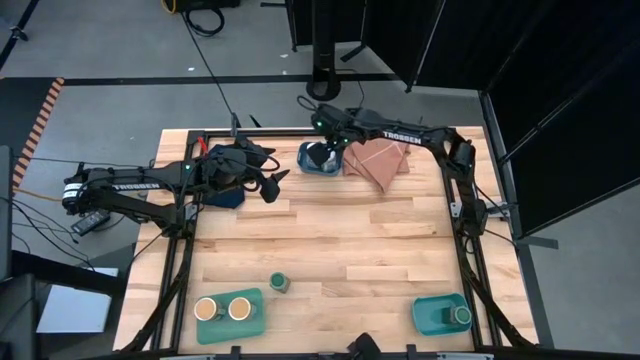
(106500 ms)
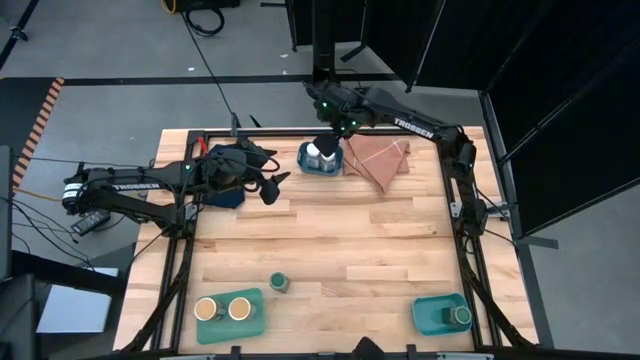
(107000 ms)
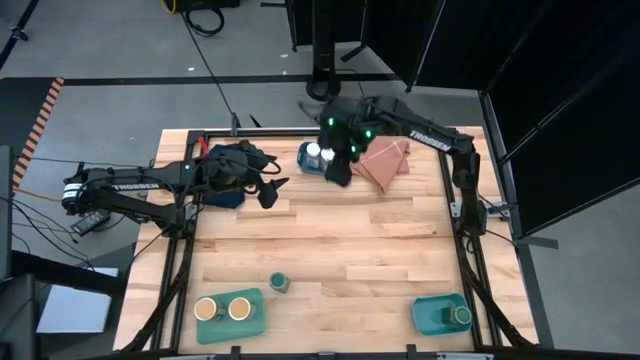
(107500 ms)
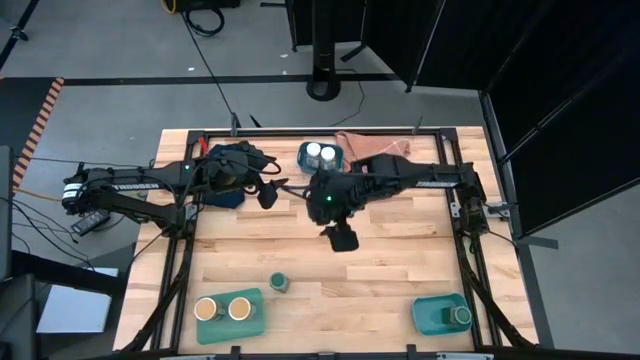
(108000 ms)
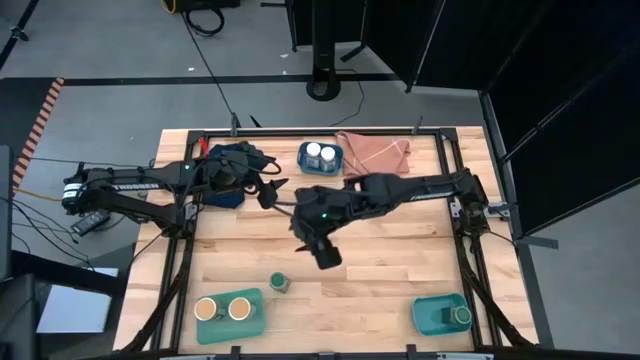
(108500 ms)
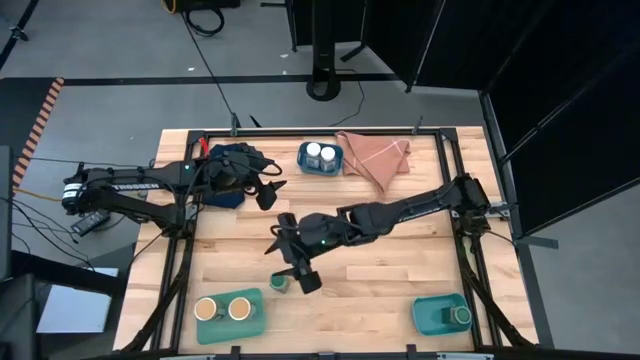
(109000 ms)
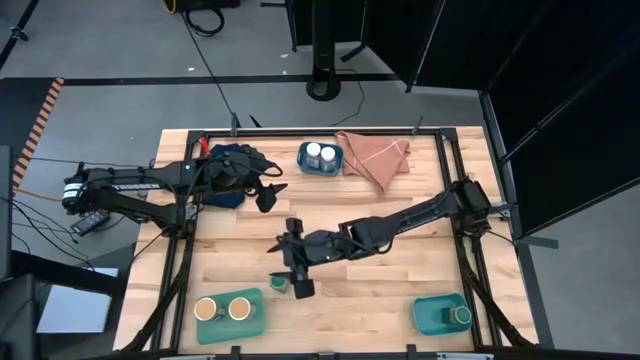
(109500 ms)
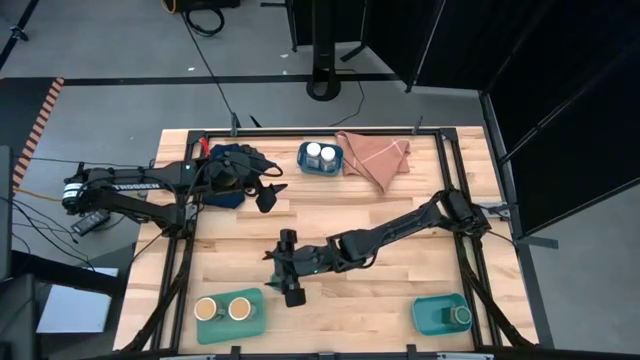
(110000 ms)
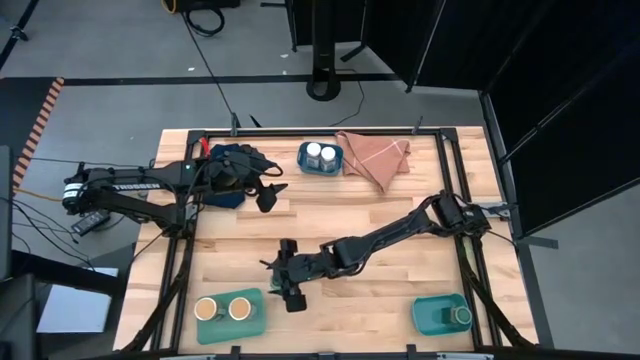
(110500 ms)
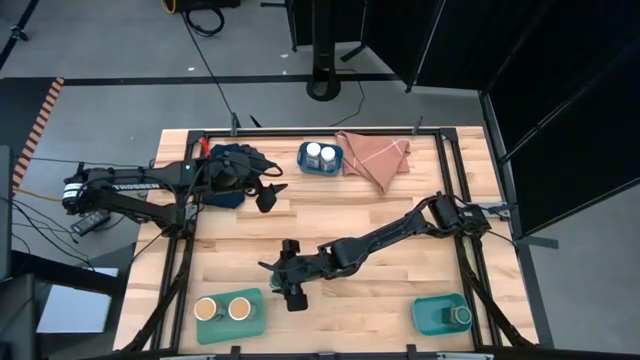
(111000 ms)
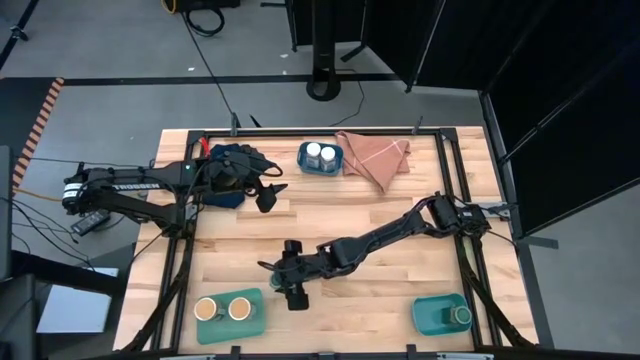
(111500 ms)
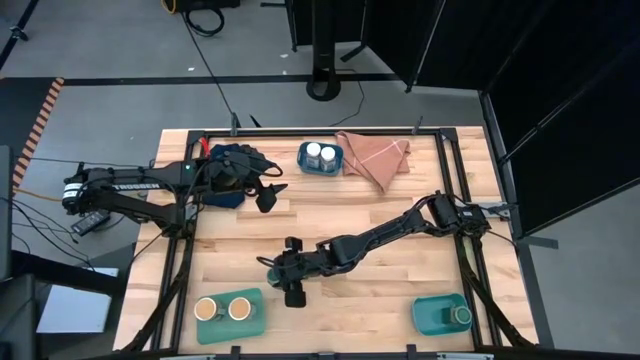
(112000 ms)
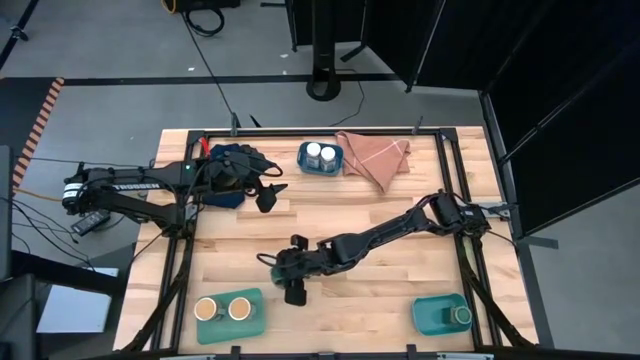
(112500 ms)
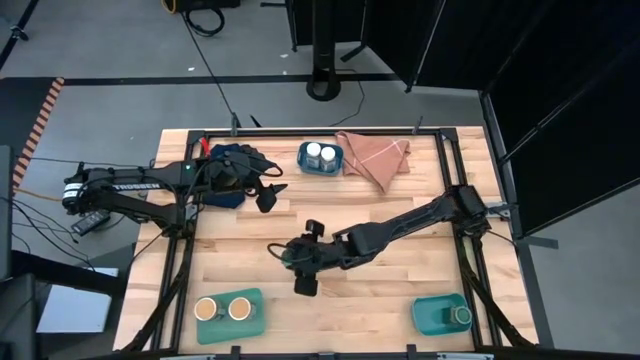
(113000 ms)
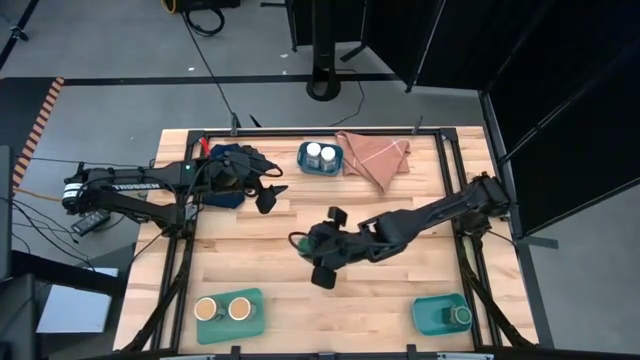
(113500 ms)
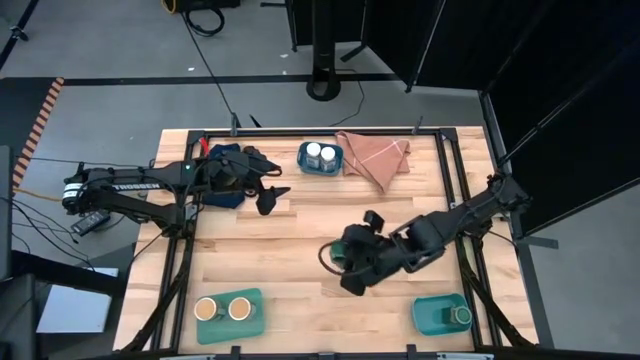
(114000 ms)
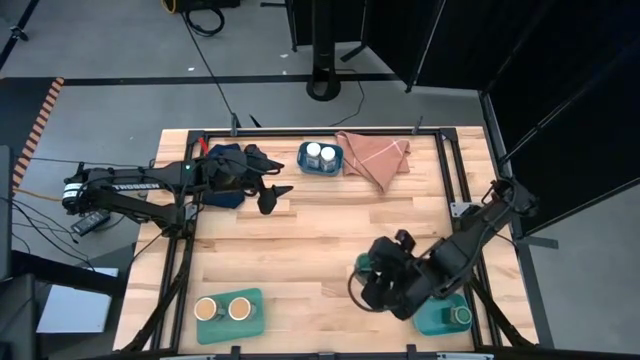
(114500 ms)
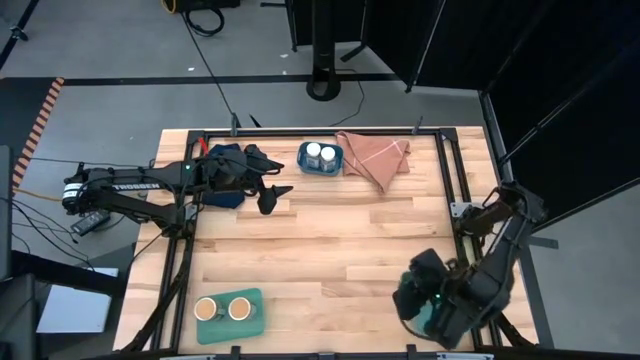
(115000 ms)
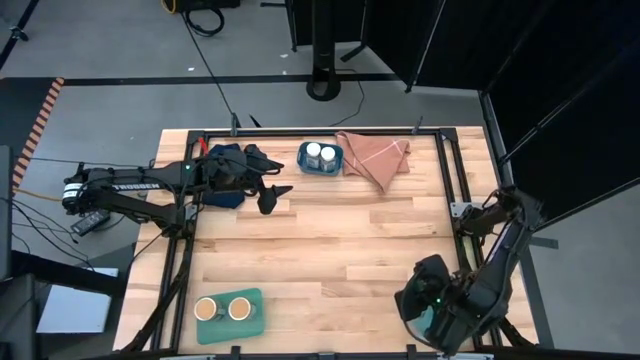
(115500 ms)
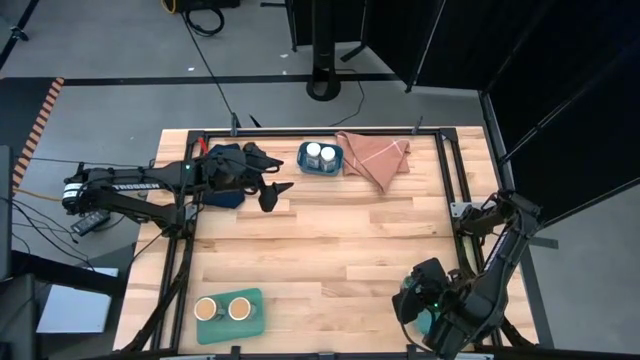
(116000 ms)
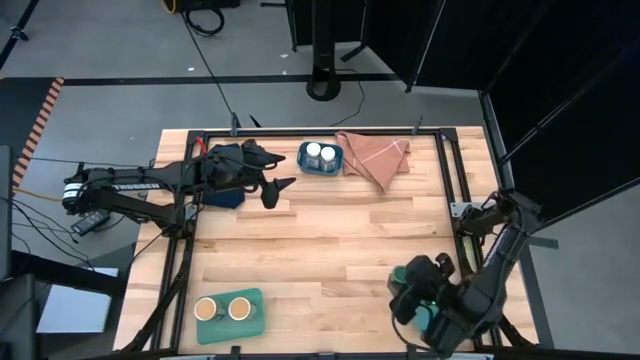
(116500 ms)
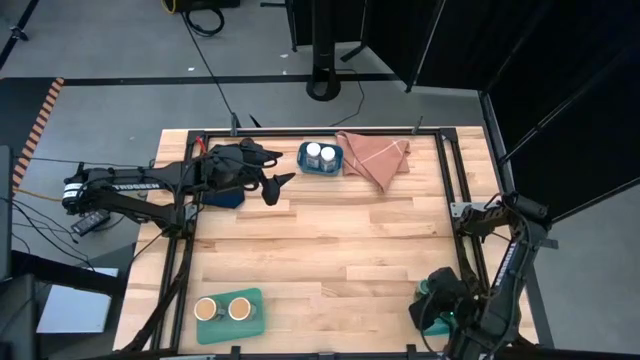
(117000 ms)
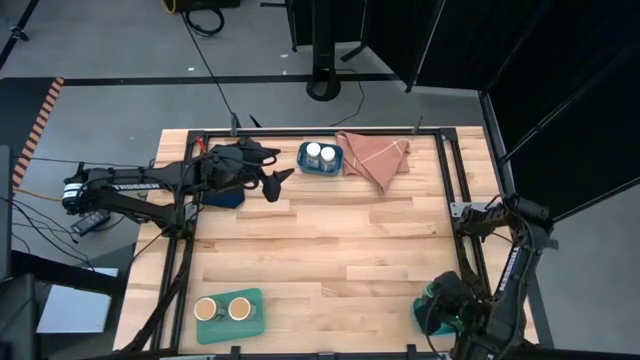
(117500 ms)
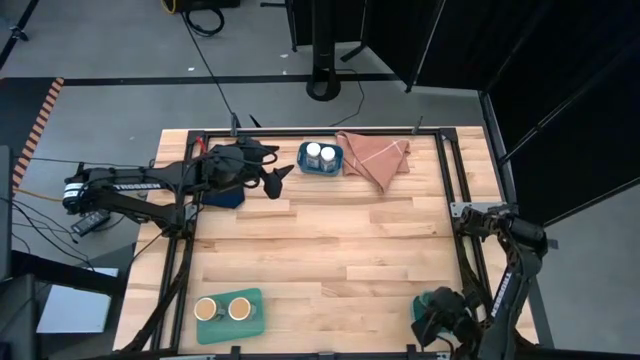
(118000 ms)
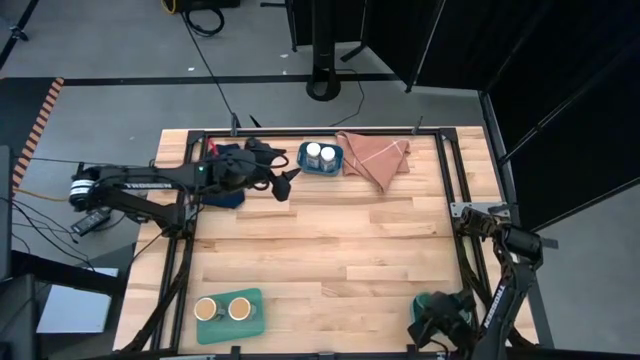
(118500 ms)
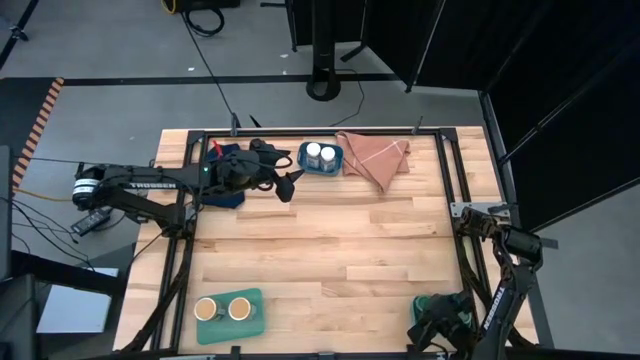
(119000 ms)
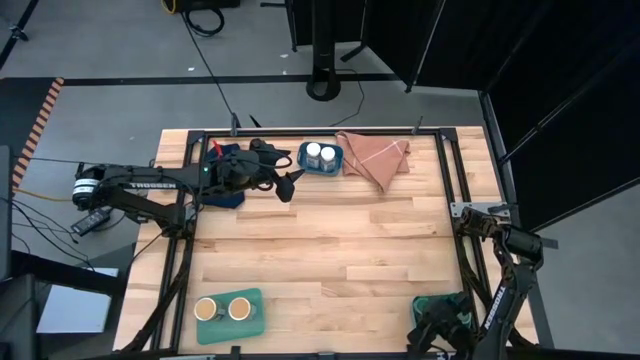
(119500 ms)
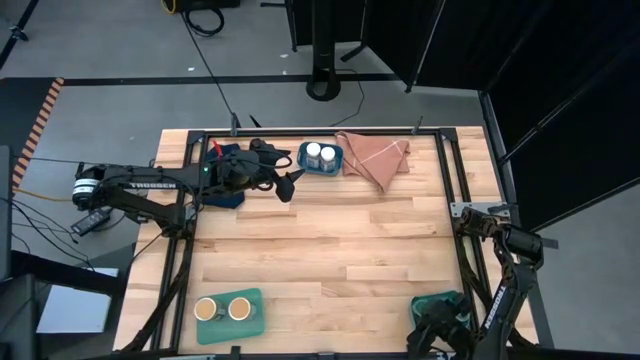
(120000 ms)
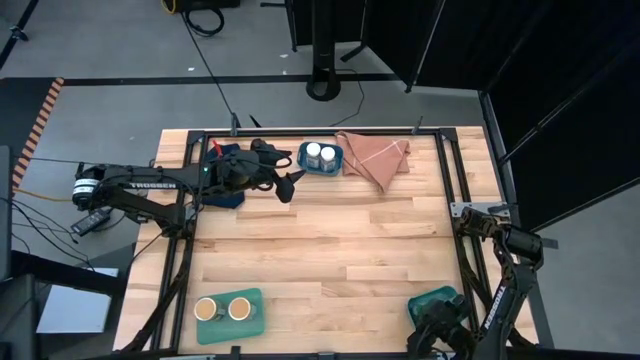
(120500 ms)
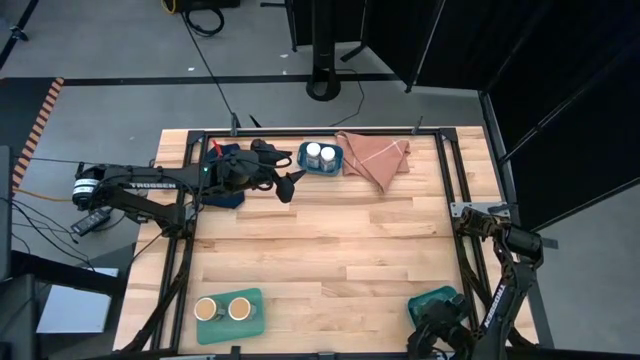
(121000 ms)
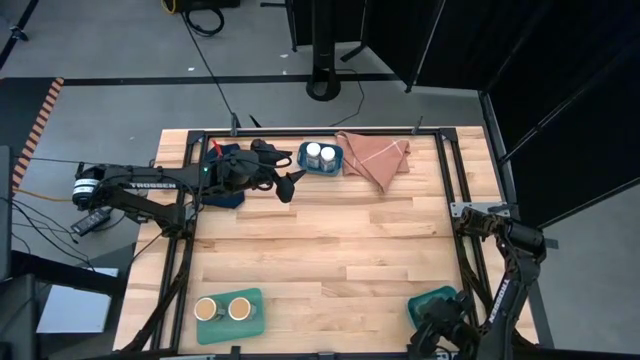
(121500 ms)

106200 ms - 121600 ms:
Task: Sort spices by type
Put the green seasoning bottle into the blue green bin

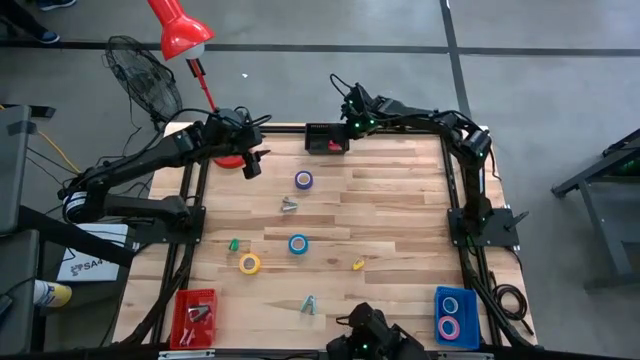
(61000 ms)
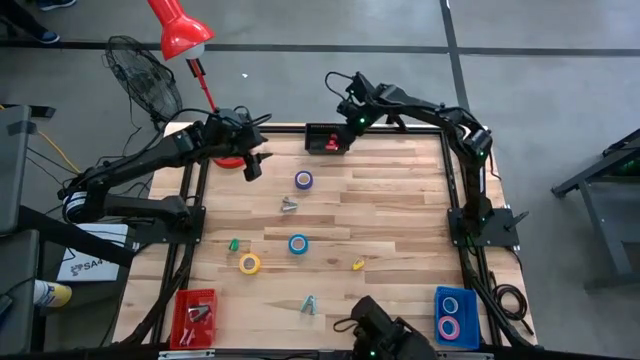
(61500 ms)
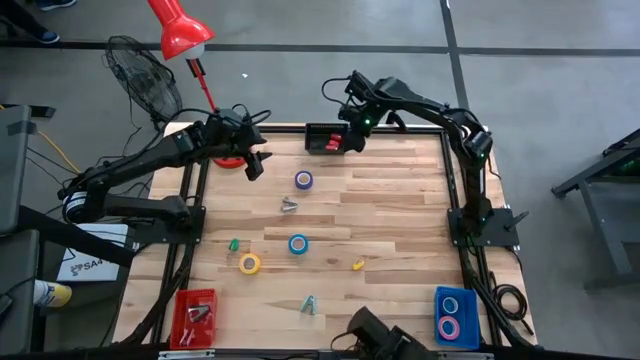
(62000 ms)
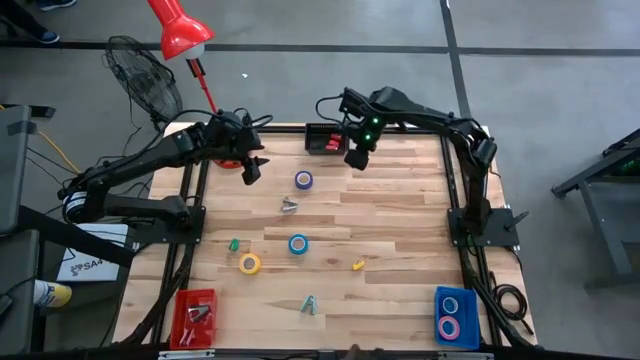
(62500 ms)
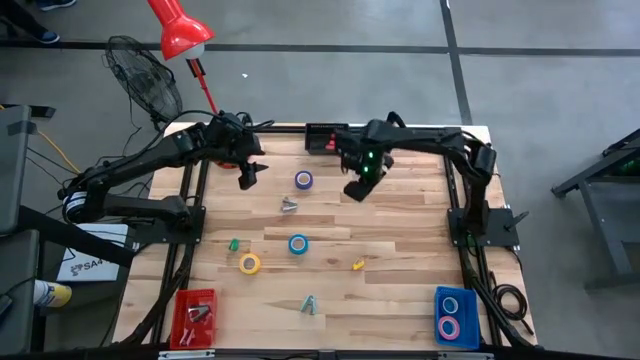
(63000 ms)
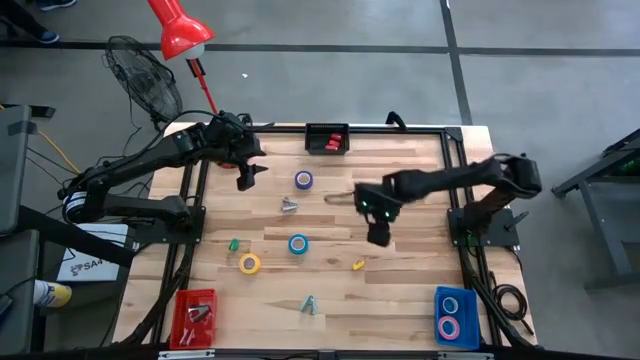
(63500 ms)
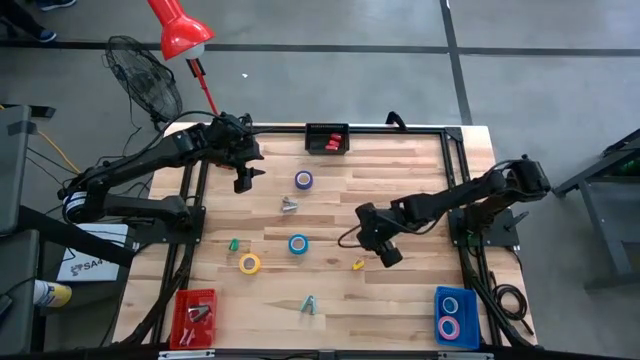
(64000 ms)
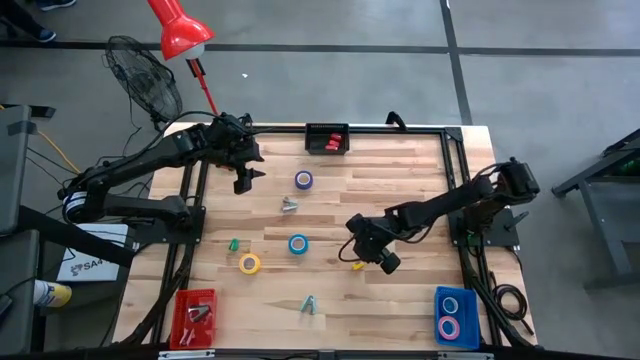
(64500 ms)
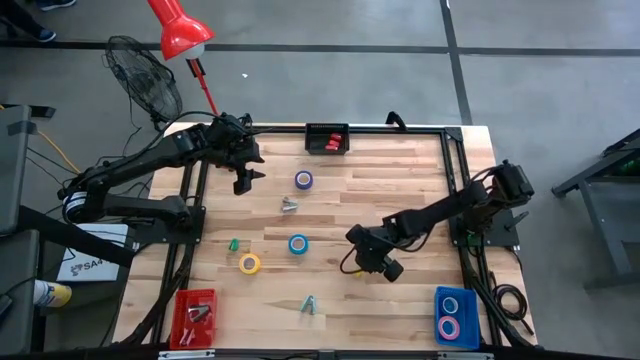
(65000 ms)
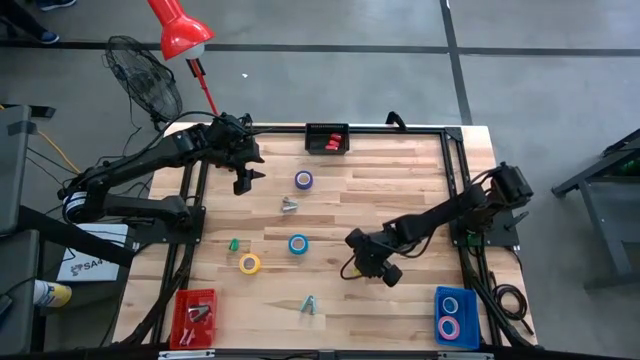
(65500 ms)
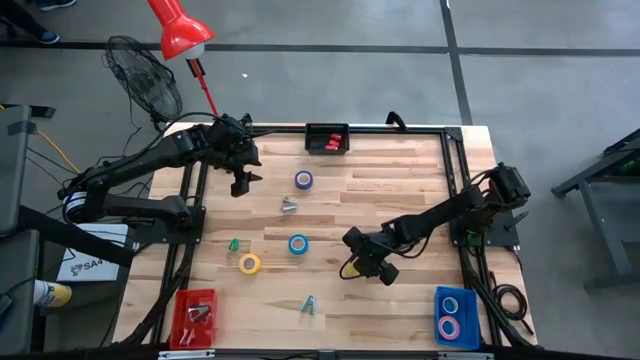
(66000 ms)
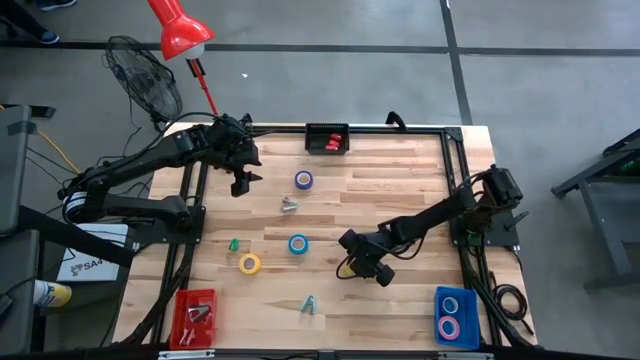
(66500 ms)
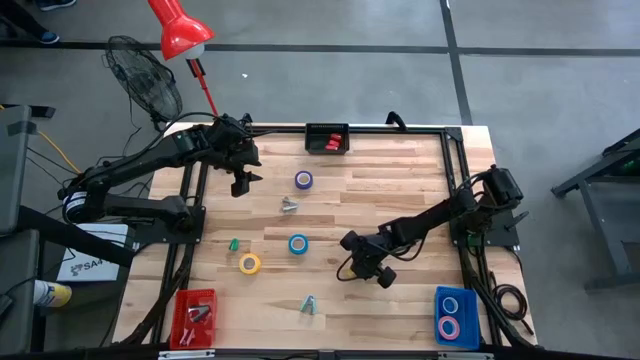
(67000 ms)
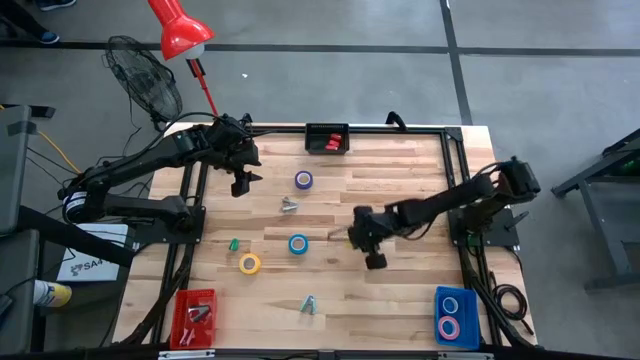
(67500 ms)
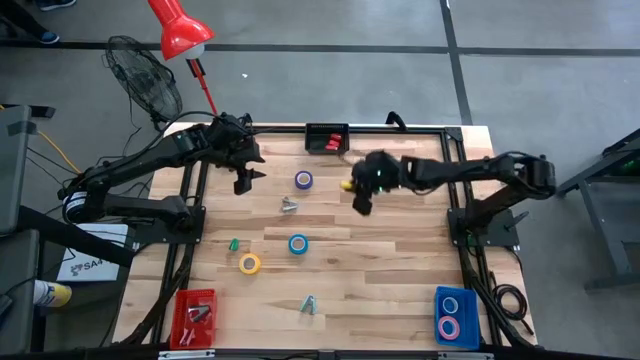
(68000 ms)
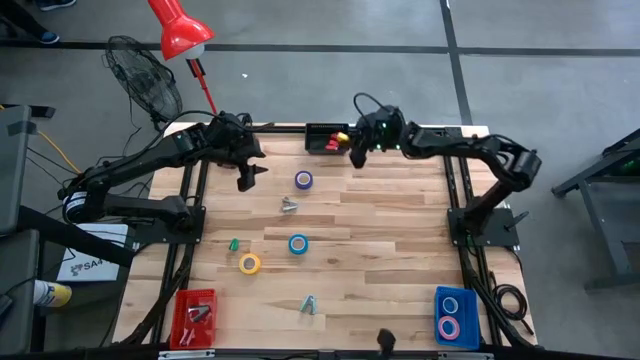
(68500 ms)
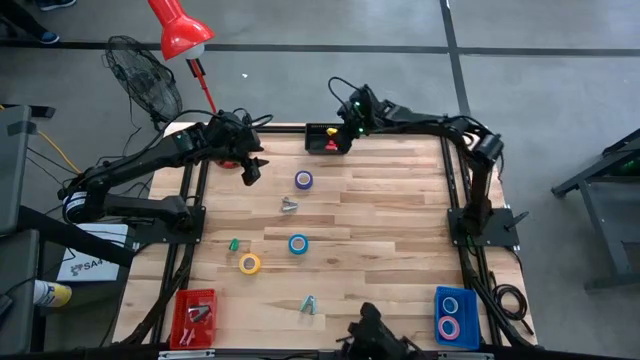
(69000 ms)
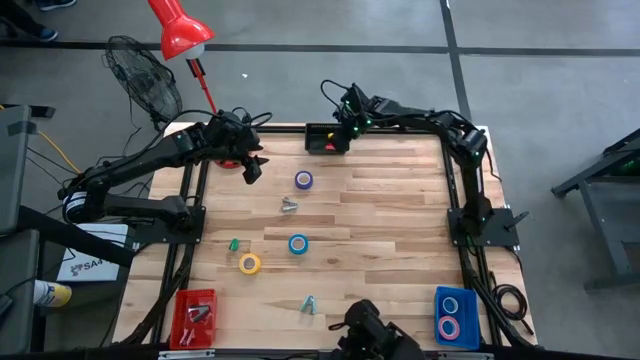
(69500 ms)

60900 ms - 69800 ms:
Task: Pick and place Stapler, Stapler remover, tape
Put the yellow stapler into the black basket
